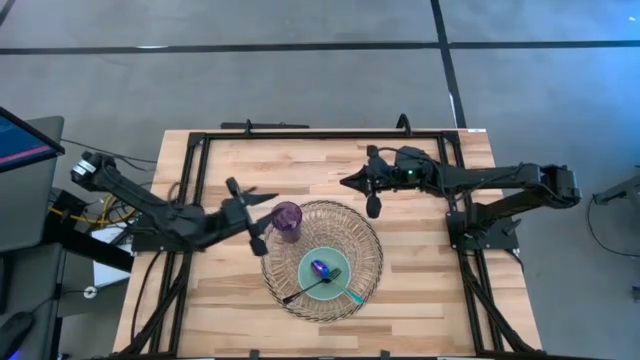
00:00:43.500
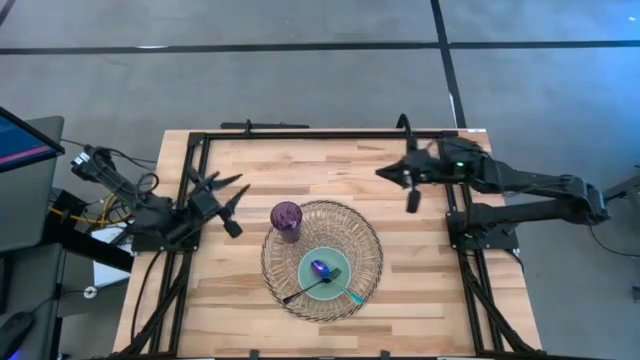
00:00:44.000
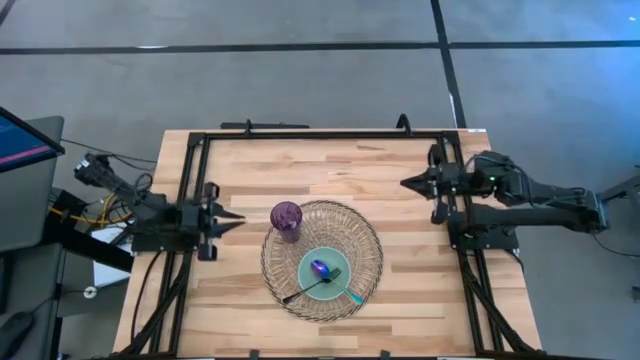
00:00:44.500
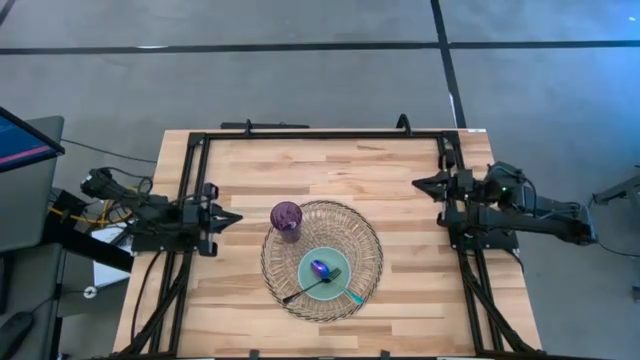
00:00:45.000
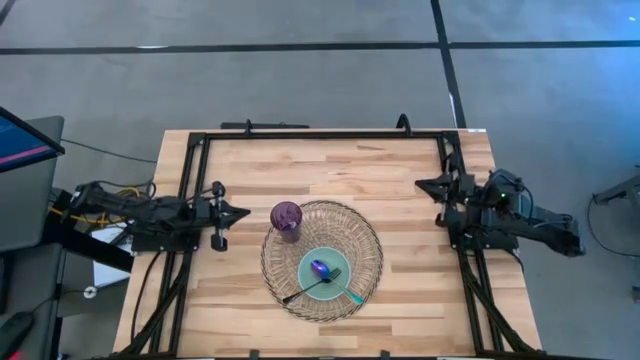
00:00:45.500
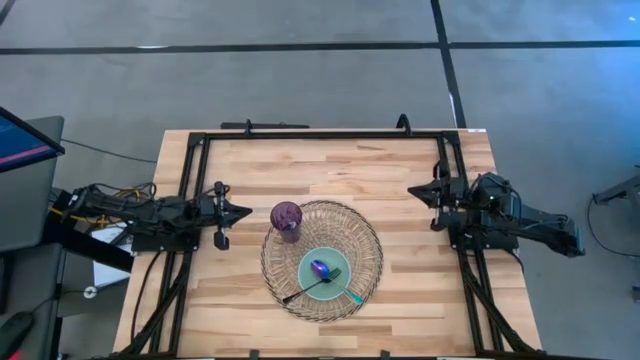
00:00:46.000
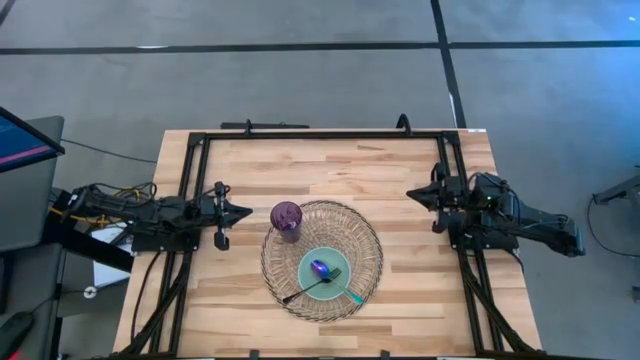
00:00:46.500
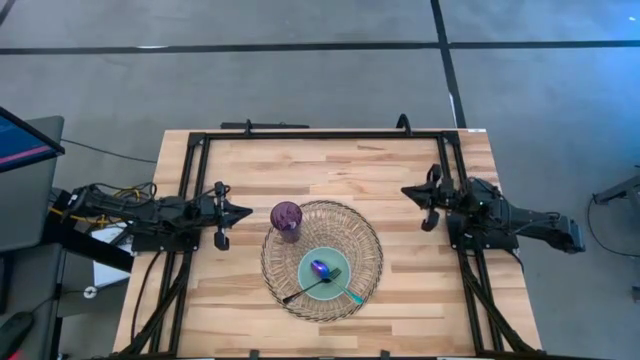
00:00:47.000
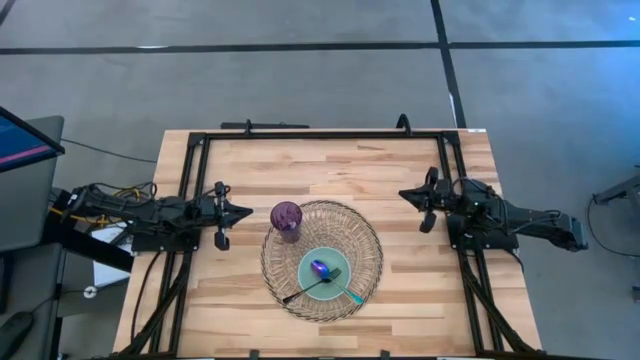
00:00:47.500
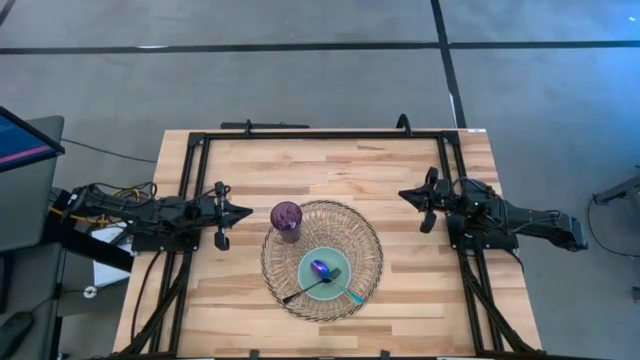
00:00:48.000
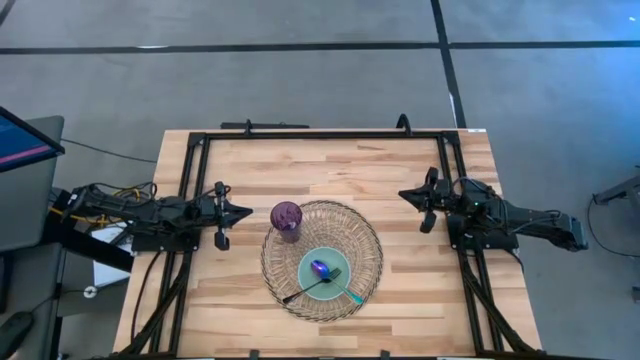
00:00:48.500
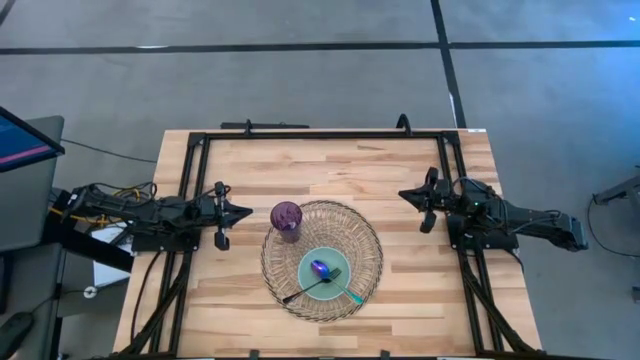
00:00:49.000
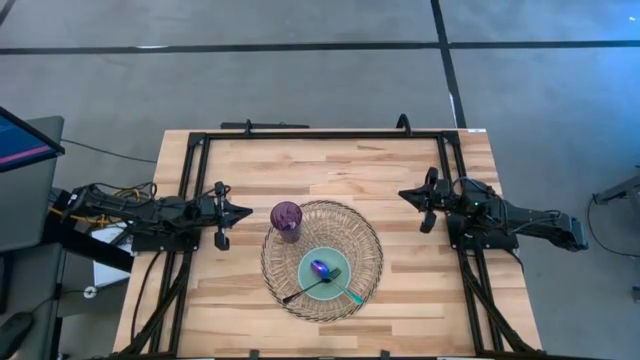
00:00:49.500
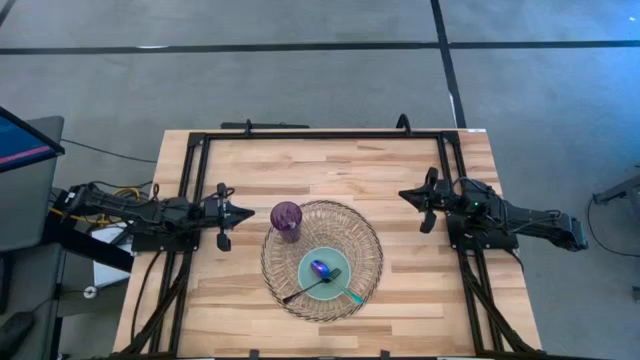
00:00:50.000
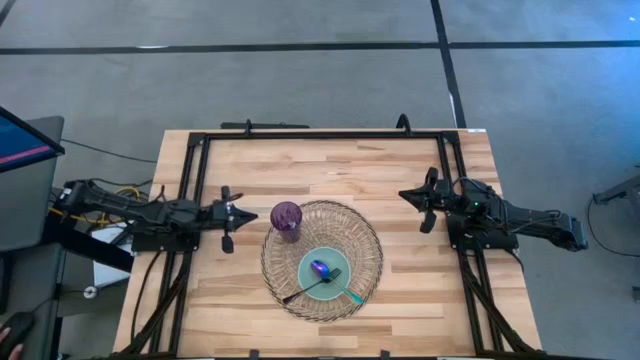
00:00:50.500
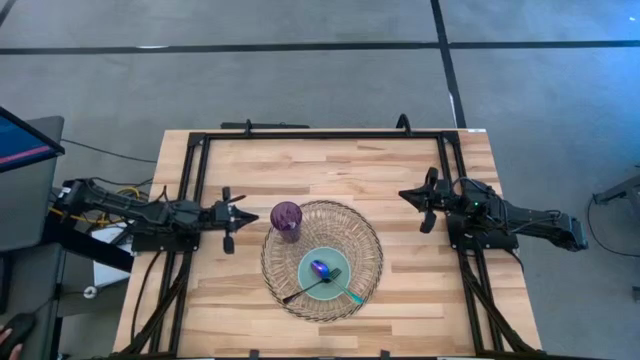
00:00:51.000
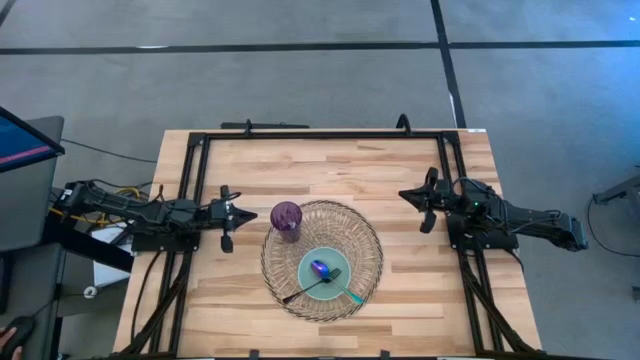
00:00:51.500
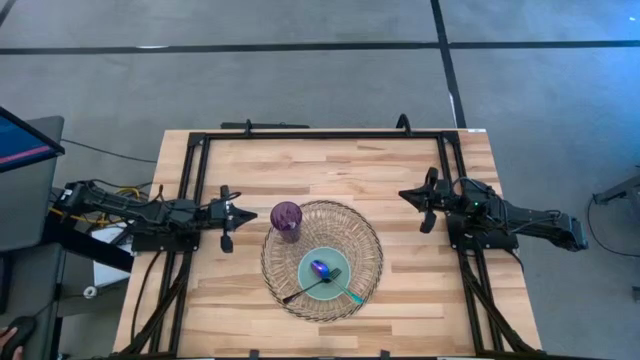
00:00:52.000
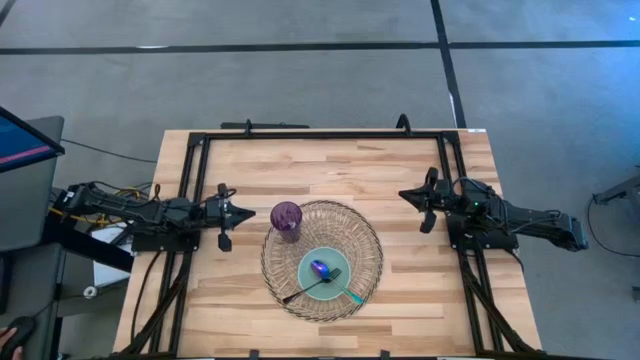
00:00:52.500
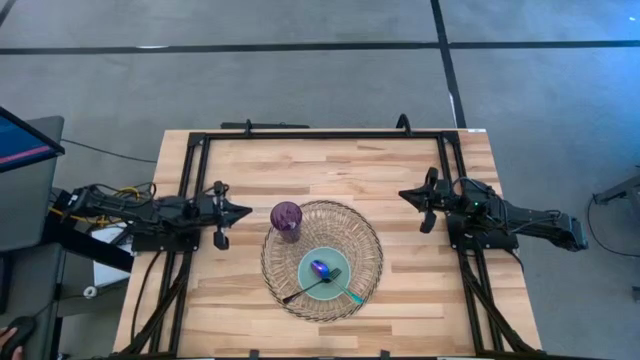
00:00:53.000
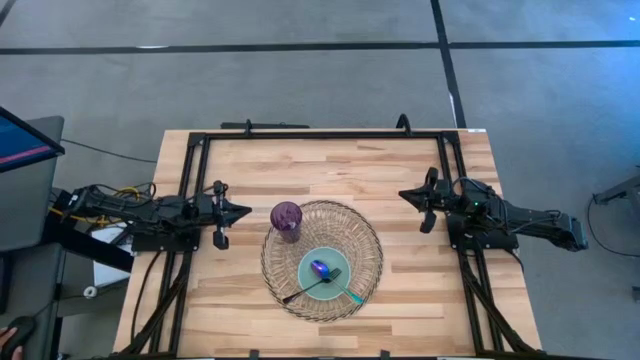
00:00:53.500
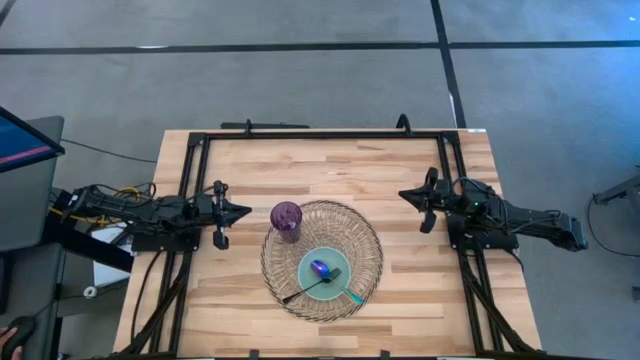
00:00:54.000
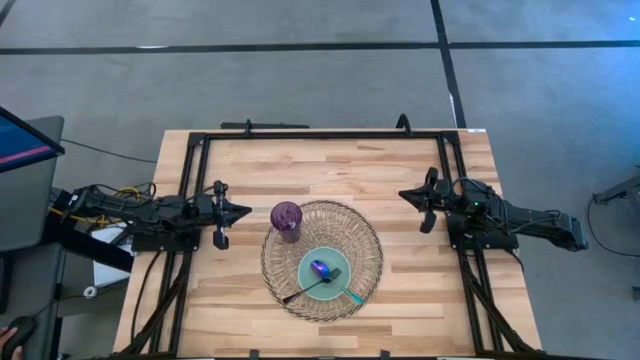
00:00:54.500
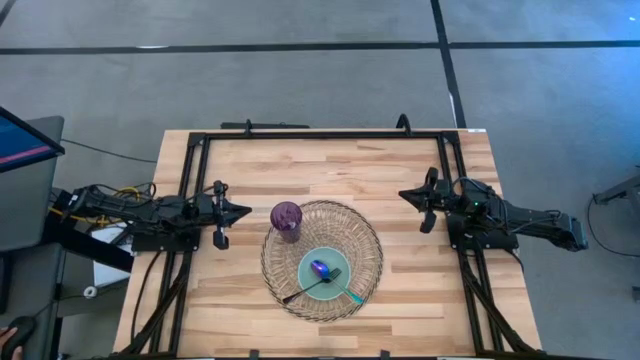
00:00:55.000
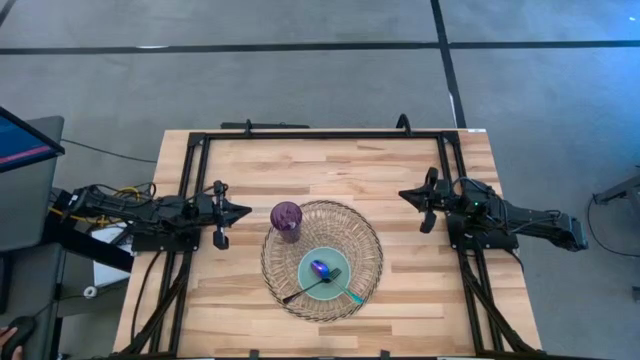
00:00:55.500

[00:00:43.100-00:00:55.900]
Task: Pick & Place Utensil
Return to Home Position

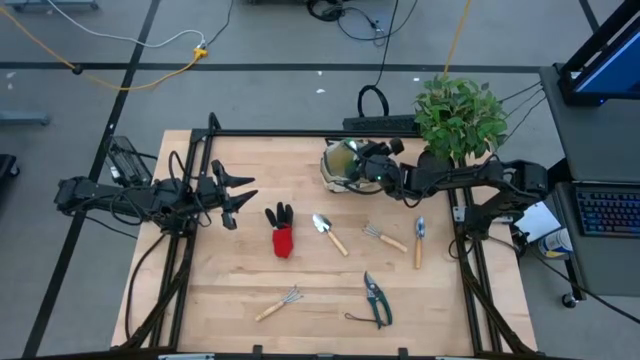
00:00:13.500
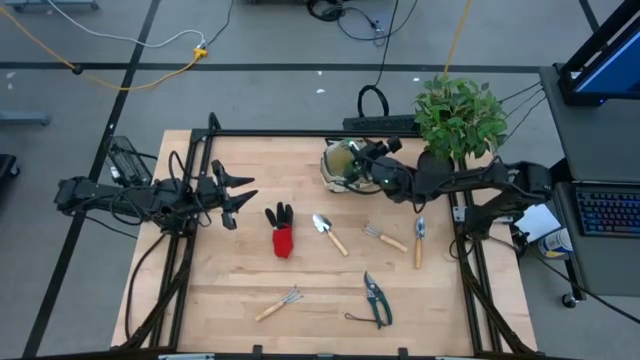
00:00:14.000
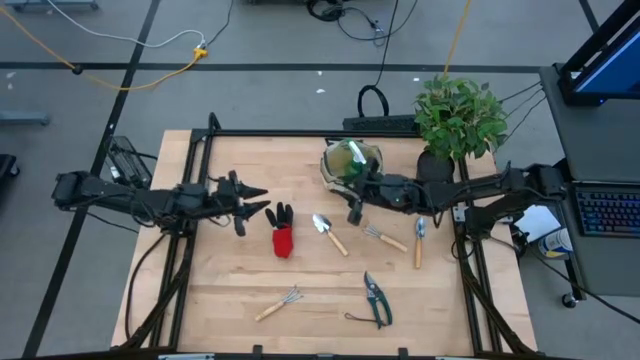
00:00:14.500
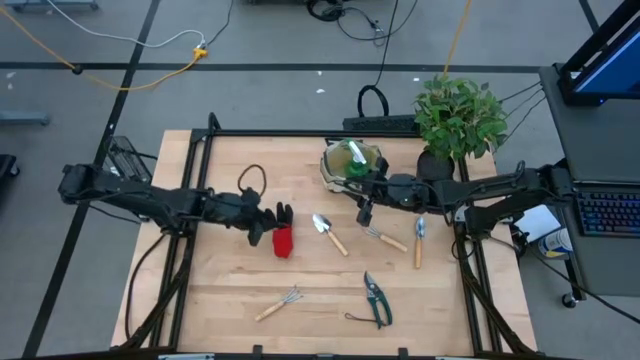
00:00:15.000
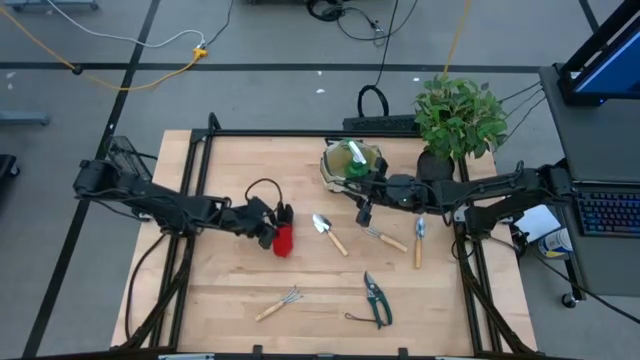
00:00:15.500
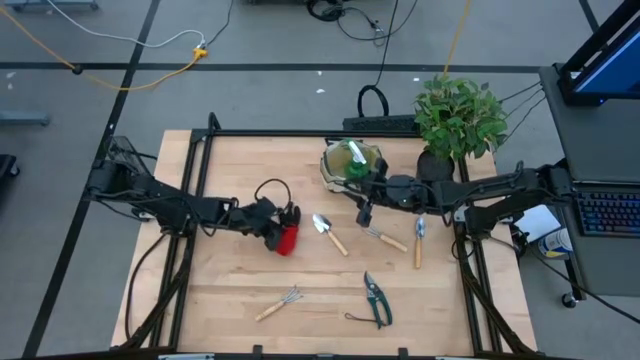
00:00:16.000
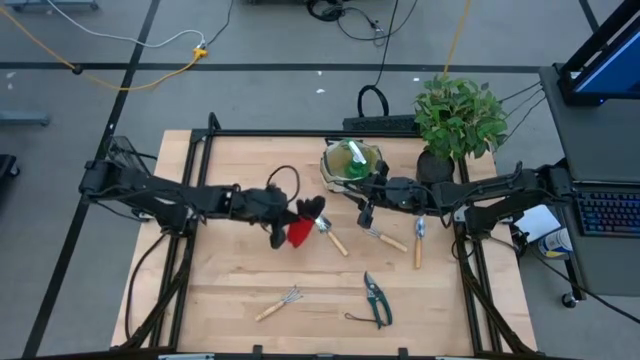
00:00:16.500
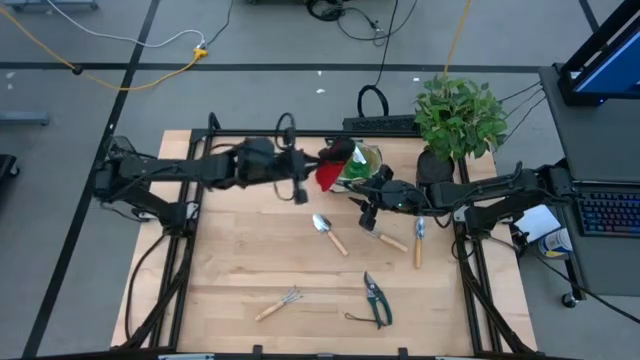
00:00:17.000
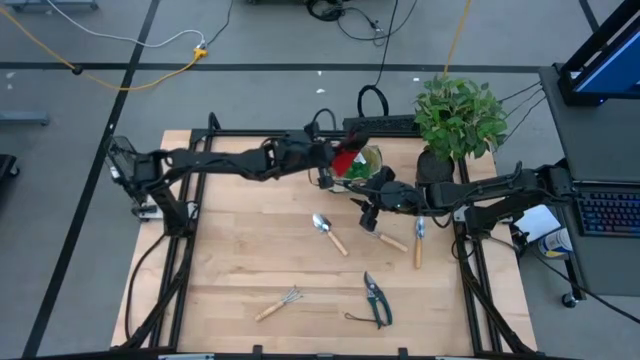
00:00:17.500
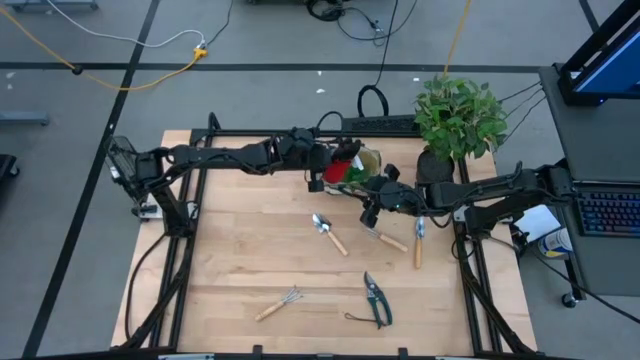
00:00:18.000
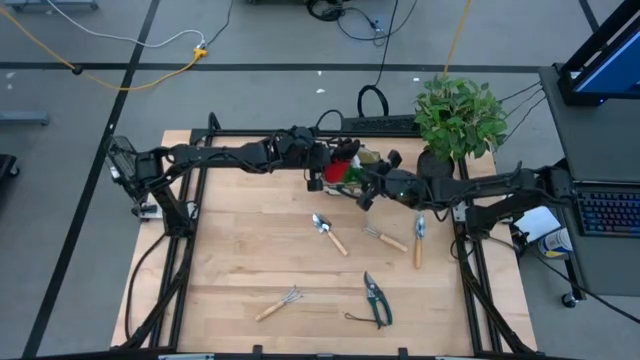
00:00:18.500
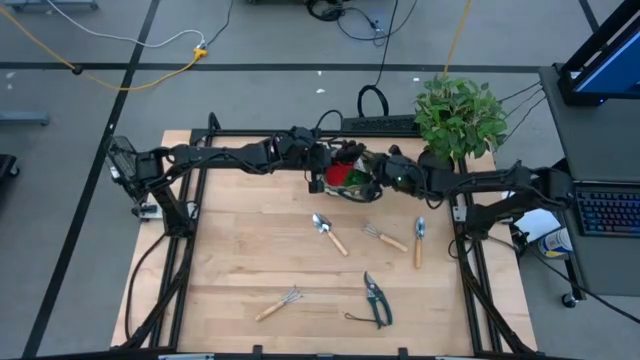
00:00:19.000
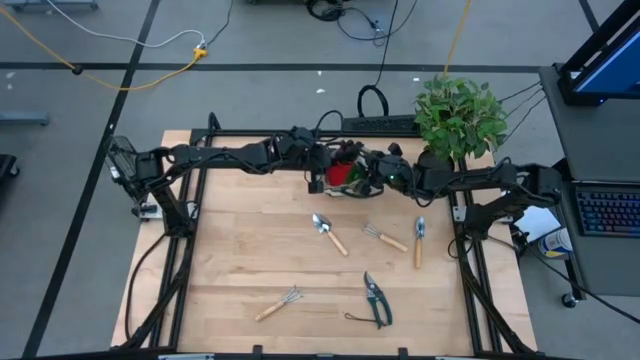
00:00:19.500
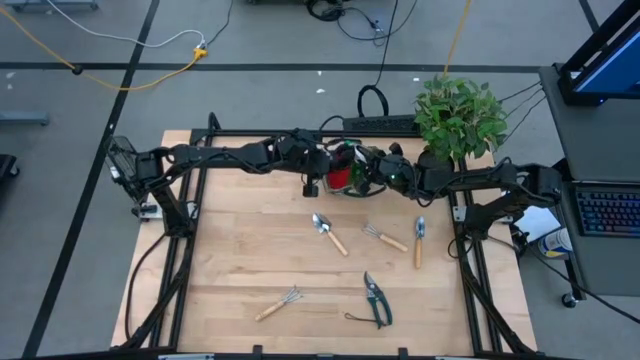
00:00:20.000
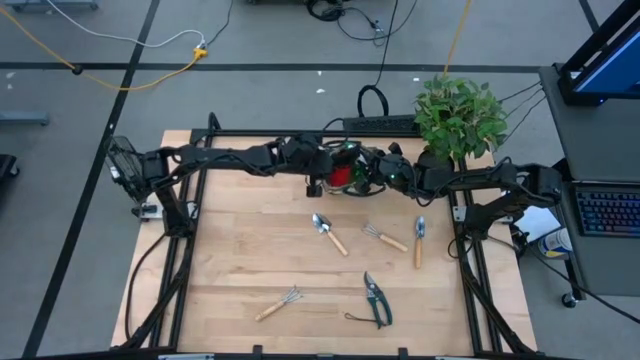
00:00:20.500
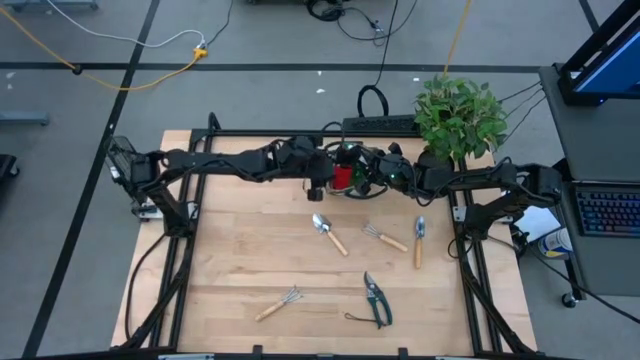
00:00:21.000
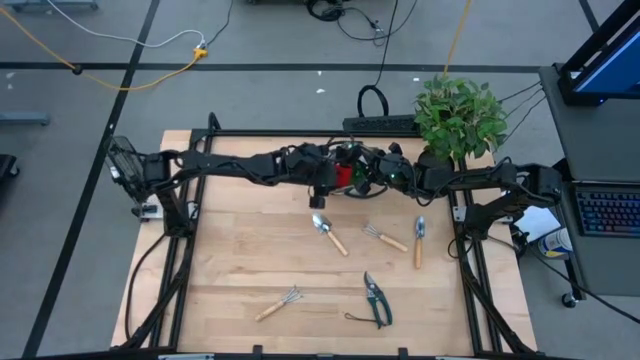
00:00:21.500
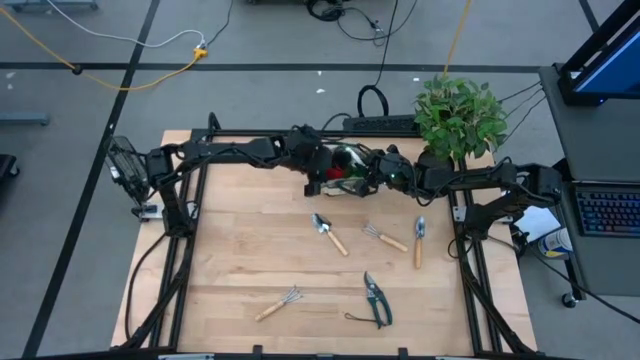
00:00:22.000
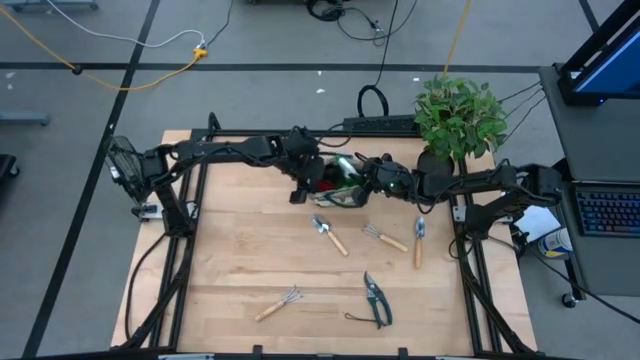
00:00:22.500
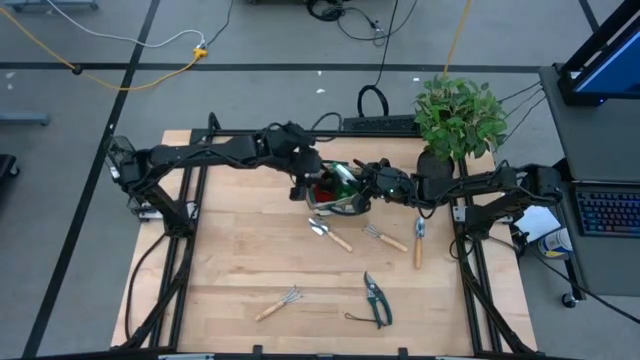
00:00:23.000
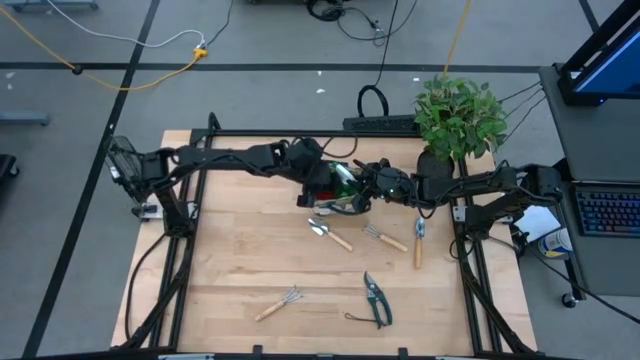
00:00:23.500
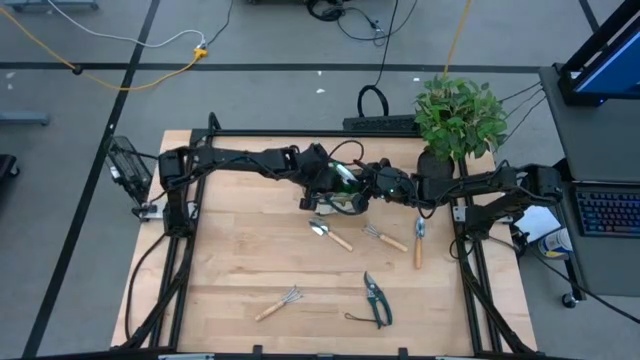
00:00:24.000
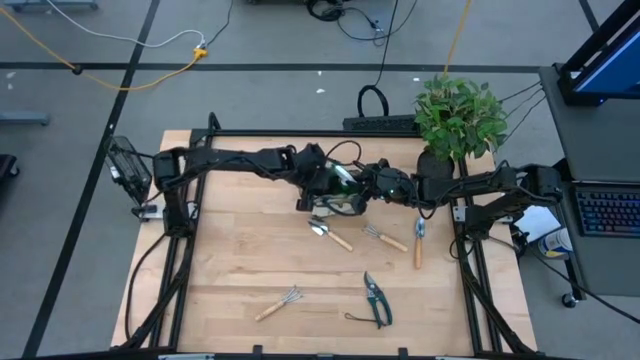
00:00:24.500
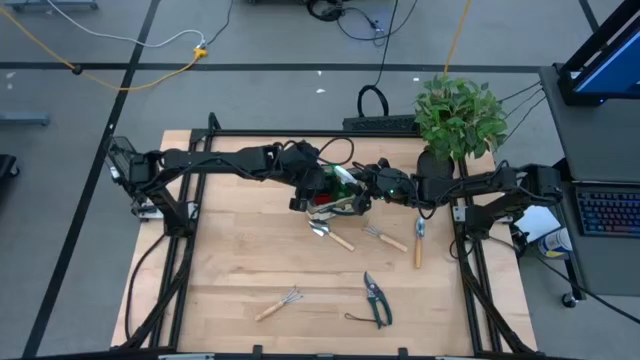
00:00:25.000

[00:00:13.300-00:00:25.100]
Task: Pick & Place Garden tools in Gardening bag
Put the red gloves into the green gardening bag
